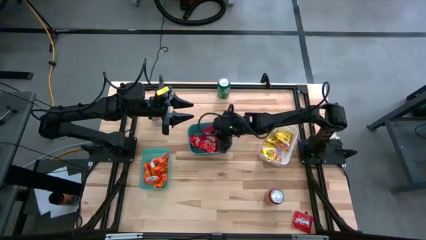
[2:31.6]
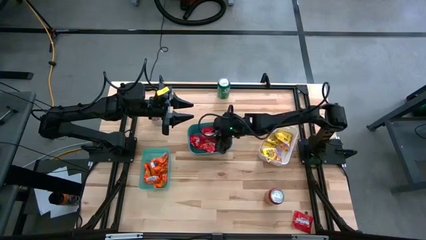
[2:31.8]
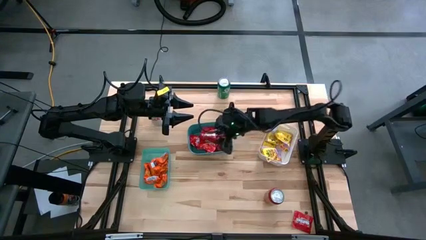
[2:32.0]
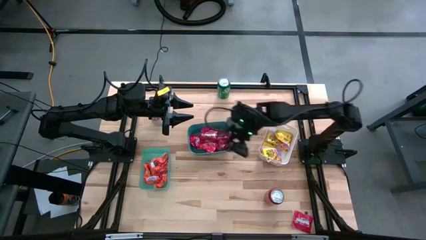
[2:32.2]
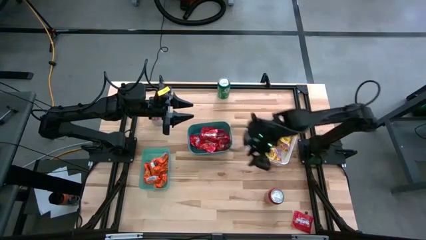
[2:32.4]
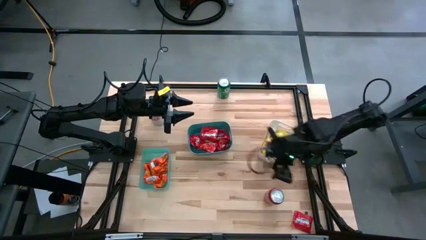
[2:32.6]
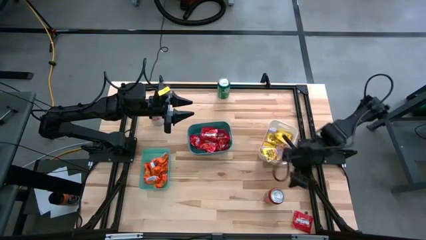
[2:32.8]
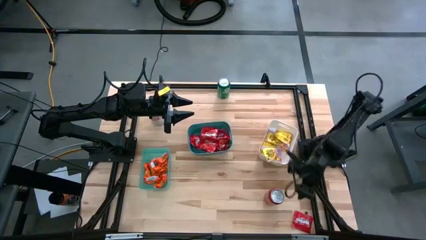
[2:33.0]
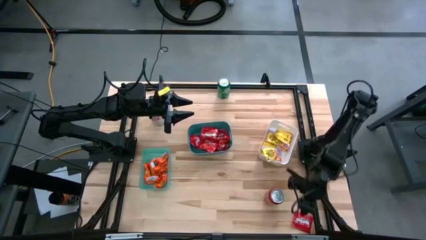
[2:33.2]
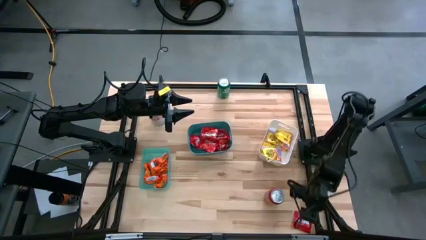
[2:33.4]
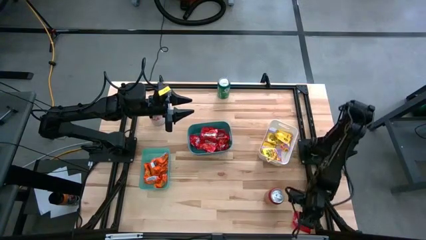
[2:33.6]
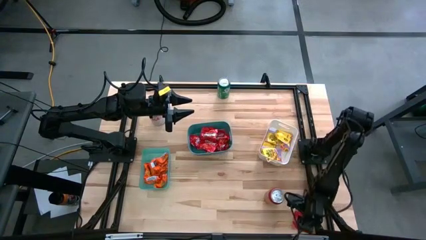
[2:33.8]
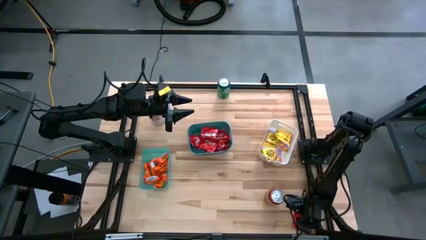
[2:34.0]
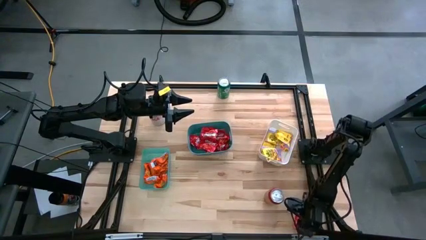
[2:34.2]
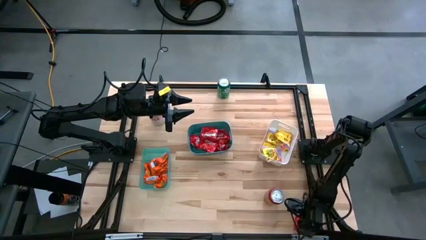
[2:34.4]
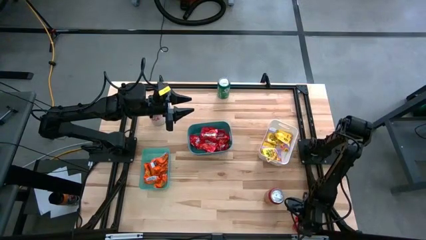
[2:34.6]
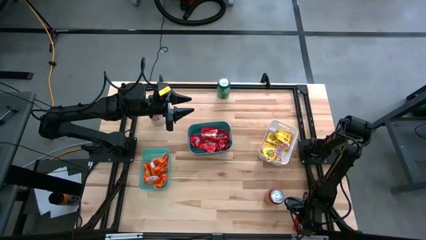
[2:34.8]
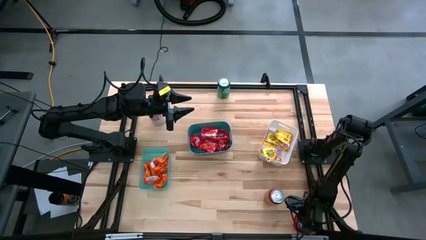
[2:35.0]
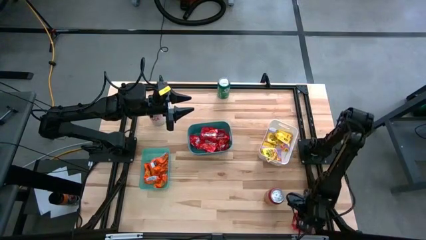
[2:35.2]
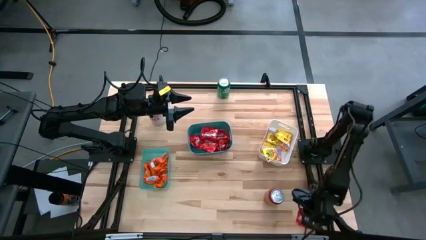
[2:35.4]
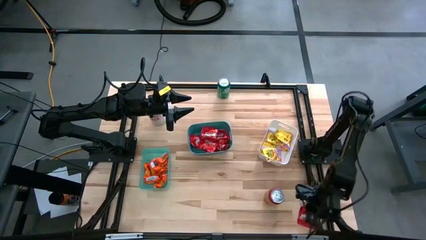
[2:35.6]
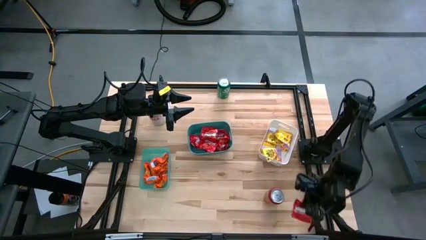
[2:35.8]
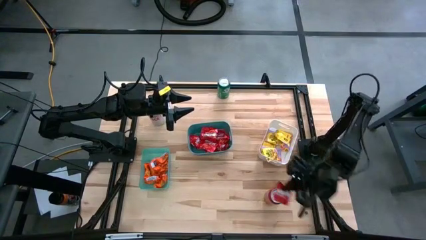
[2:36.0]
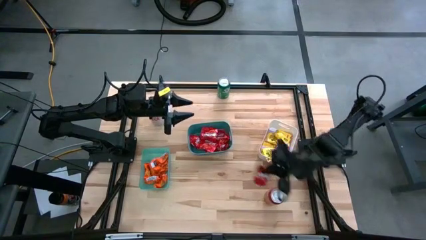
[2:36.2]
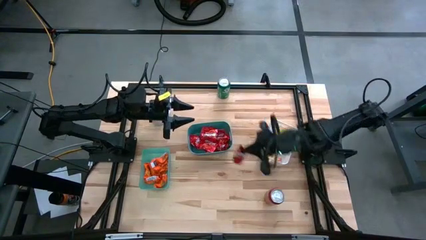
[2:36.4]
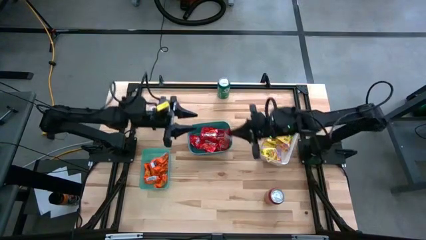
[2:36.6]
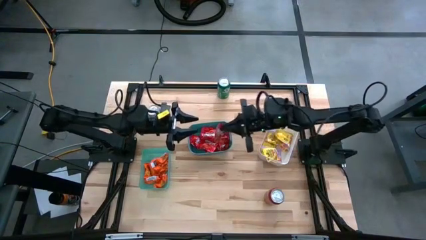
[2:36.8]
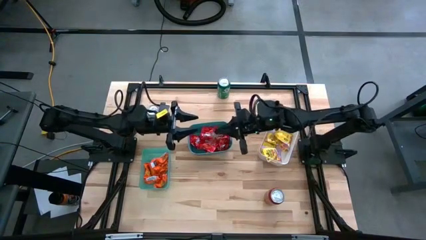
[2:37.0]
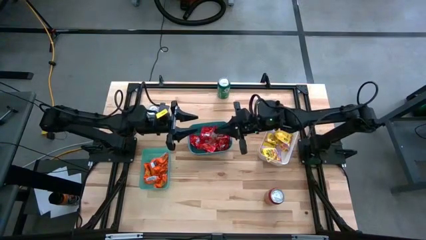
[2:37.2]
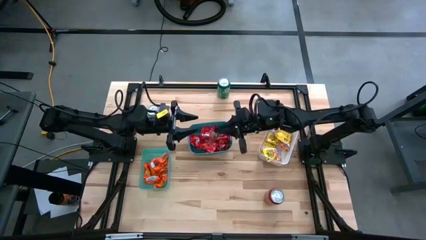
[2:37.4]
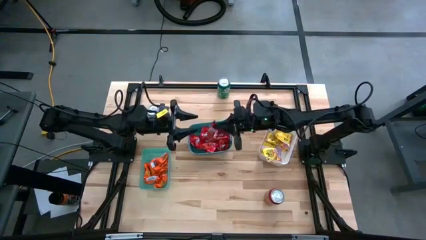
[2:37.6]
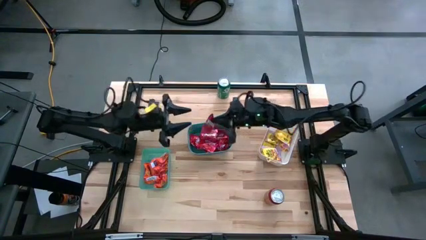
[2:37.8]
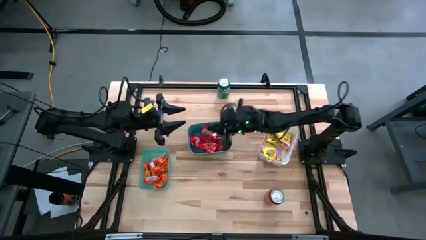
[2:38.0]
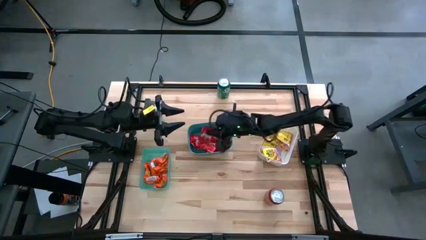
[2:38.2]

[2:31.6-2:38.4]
Task: Sort candy
Put the red candy into the green bin

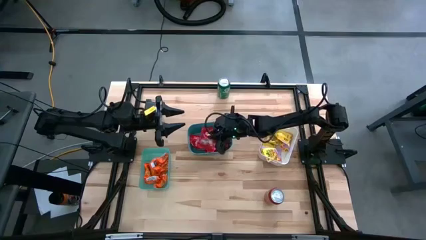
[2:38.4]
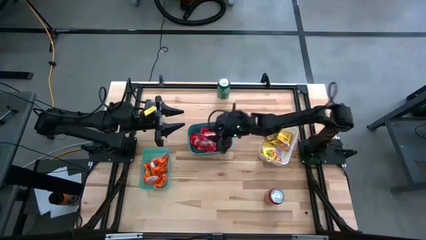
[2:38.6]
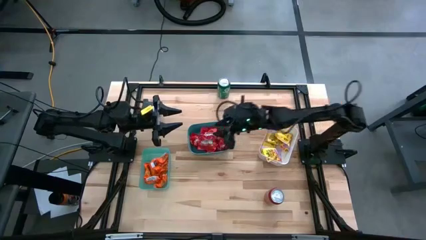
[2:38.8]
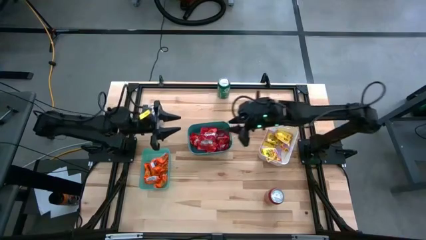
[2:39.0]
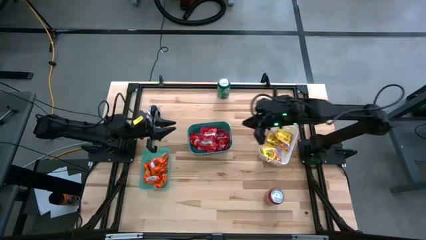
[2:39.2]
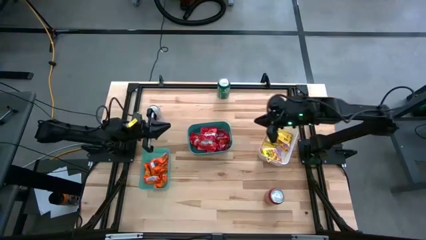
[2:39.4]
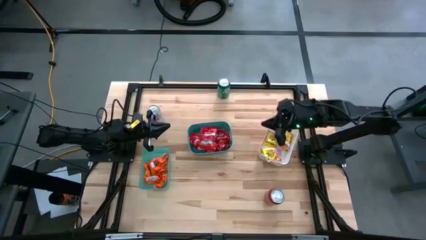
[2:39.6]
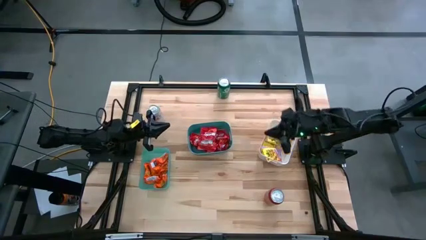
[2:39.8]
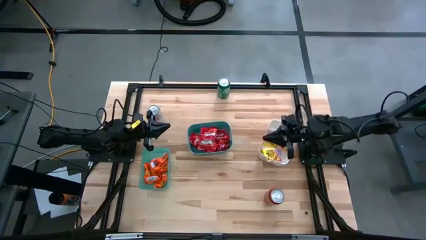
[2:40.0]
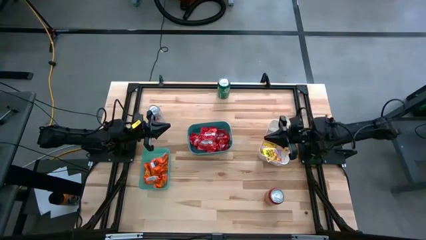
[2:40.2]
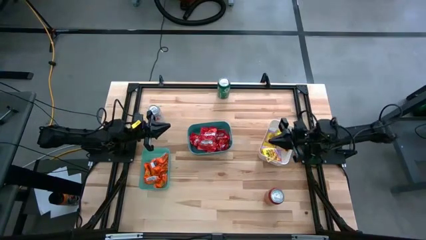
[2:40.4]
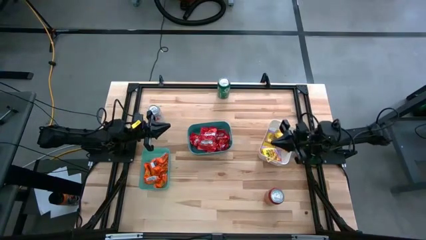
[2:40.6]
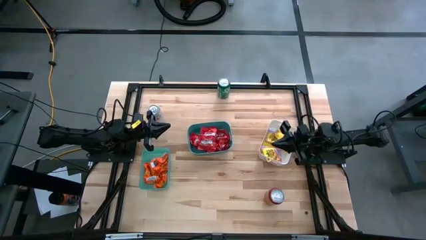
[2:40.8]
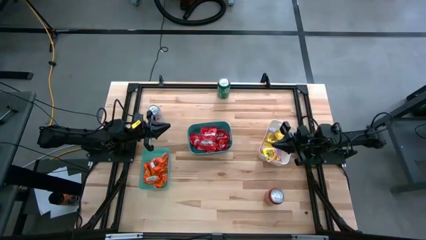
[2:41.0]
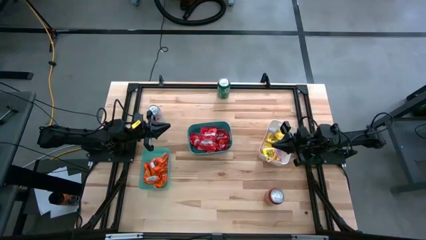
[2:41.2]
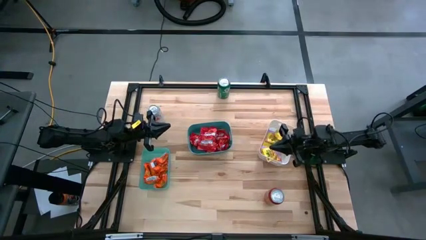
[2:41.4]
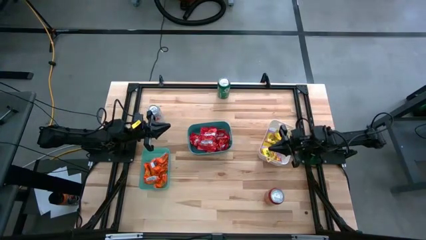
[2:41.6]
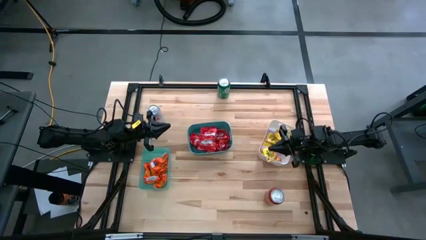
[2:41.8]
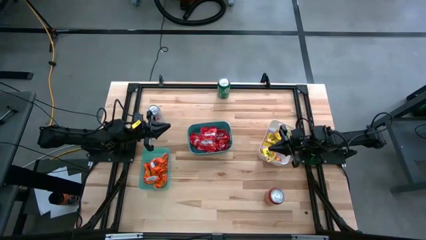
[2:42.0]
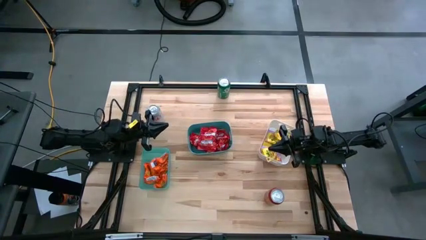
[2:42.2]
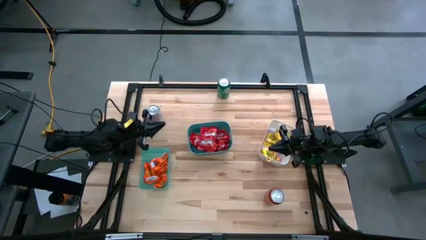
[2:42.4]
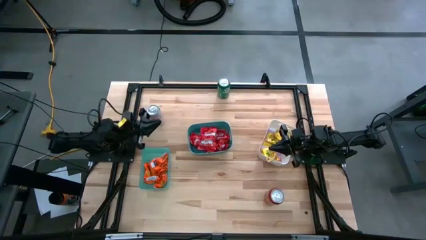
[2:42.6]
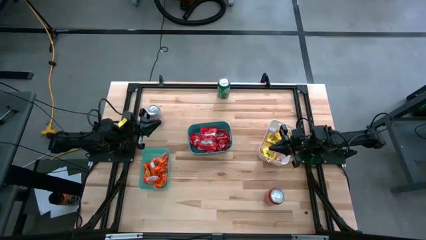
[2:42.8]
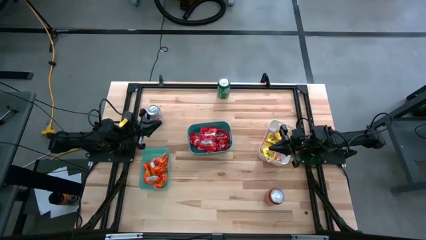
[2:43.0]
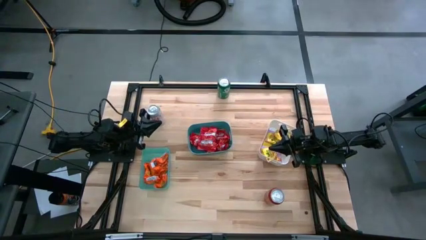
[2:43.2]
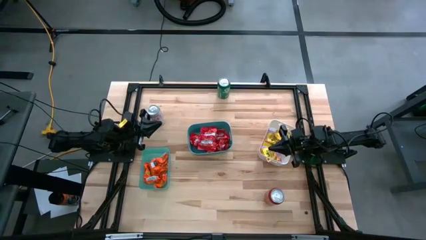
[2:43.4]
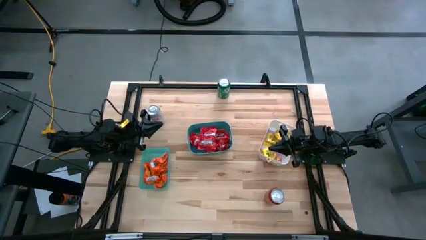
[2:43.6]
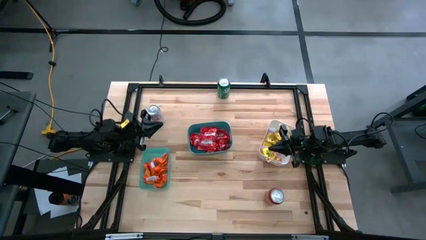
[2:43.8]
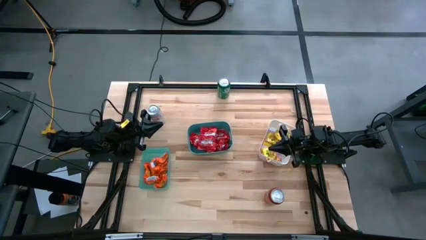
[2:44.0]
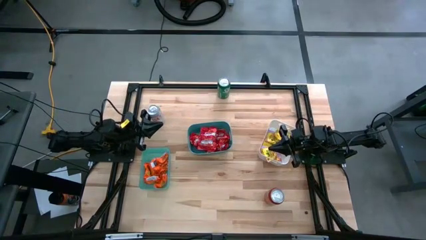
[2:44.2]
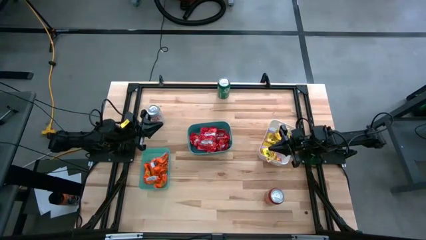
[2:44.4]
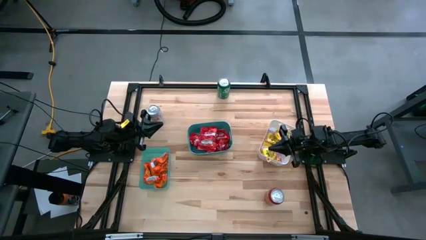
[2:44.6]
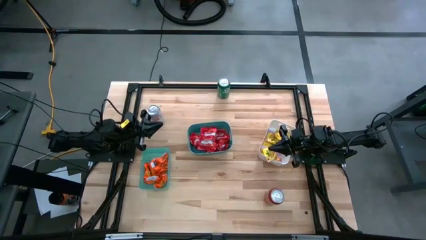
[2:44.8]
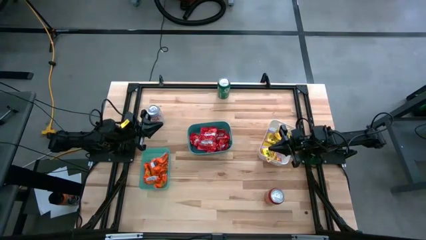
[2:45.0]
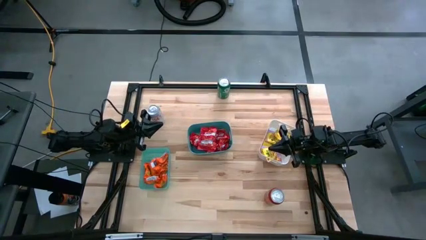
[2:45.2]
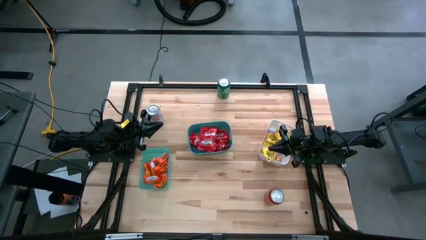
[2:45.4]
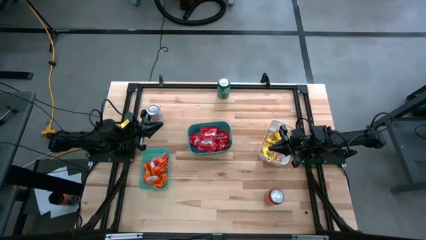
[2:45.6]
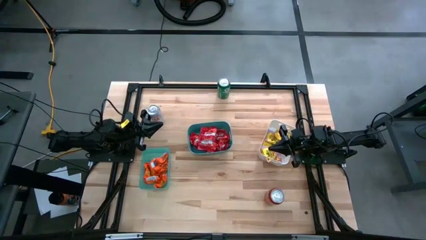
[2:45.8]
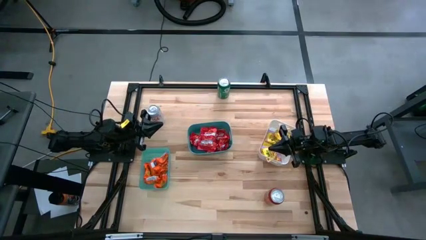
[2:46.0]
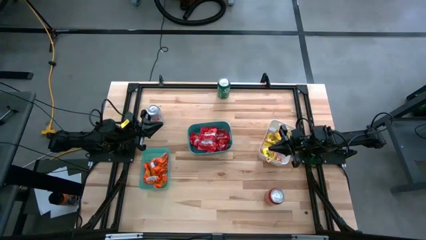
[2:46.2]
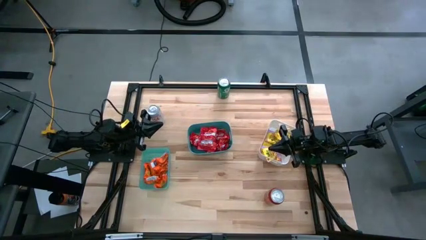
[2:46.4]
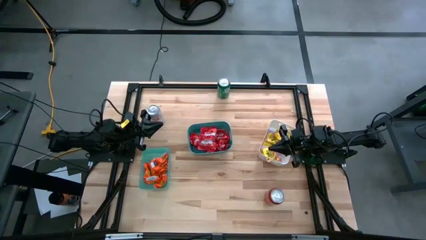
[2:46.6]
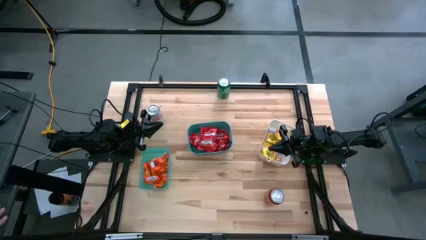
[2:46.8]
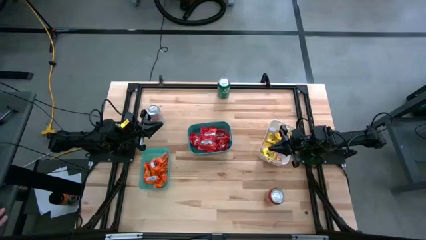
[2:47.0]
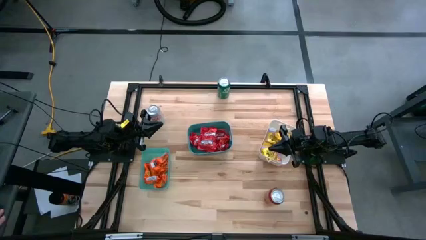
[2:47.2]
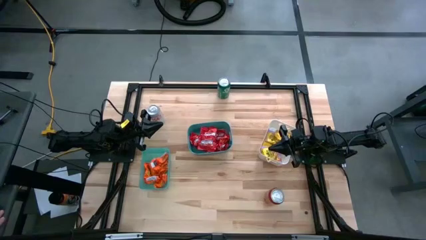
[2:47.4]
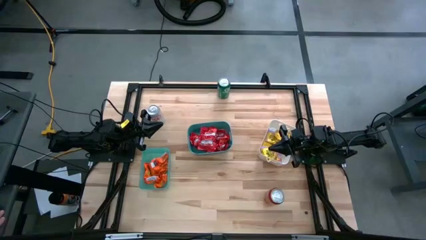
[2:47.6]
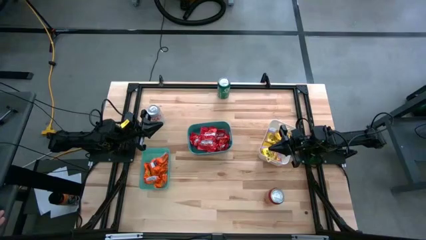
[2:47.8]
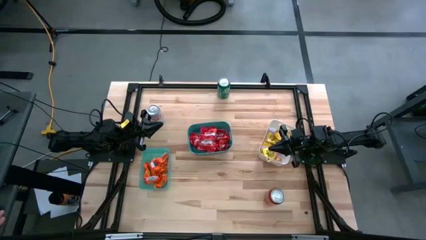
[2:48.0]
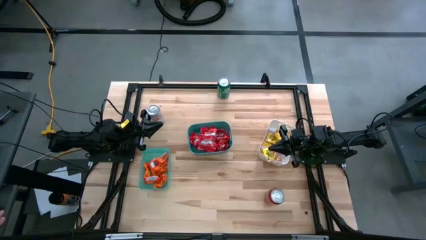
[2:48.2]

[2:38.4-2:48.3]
Return to Home Position
